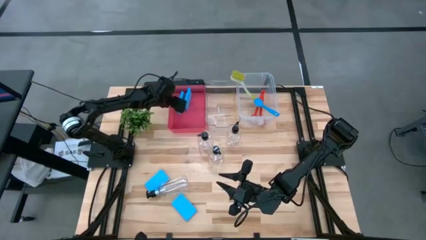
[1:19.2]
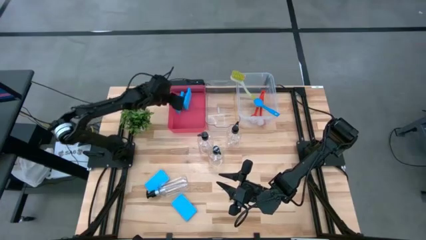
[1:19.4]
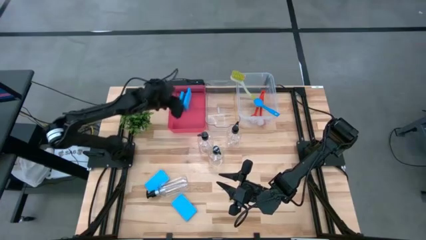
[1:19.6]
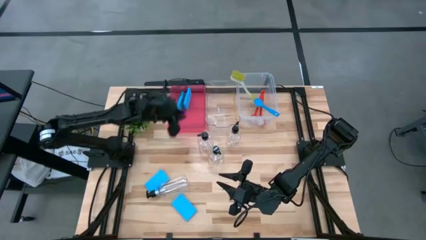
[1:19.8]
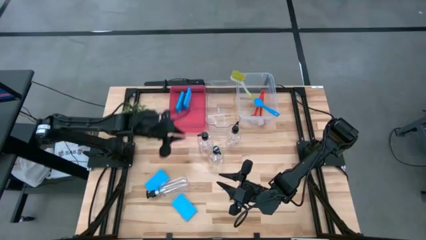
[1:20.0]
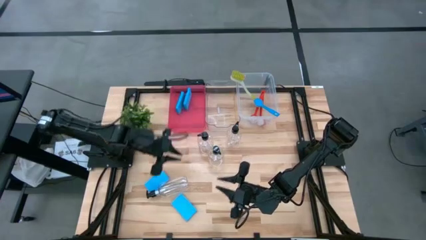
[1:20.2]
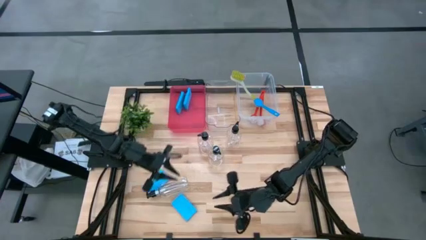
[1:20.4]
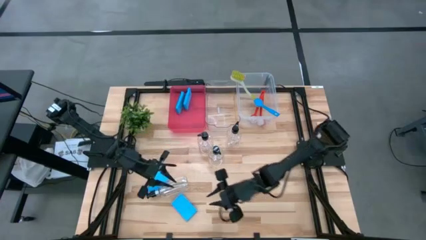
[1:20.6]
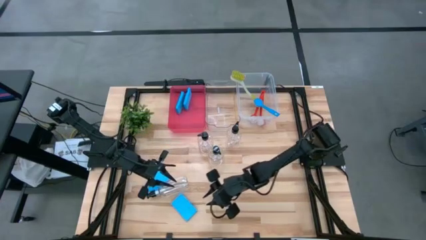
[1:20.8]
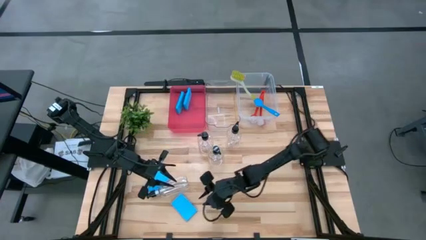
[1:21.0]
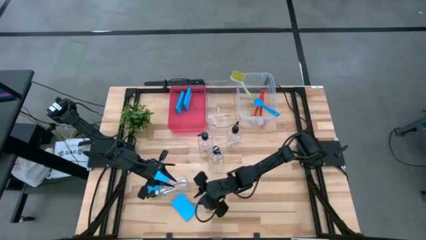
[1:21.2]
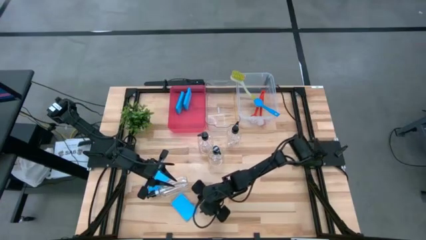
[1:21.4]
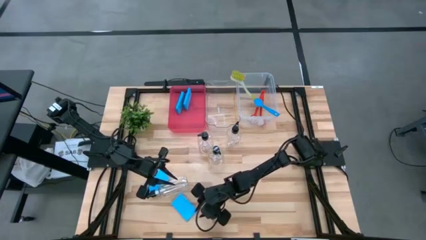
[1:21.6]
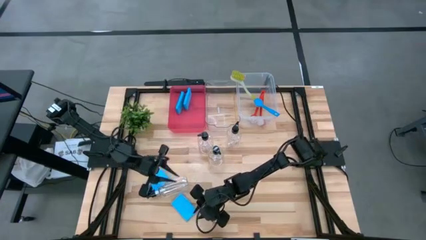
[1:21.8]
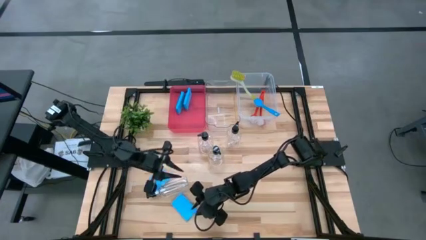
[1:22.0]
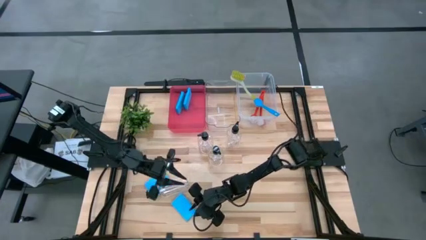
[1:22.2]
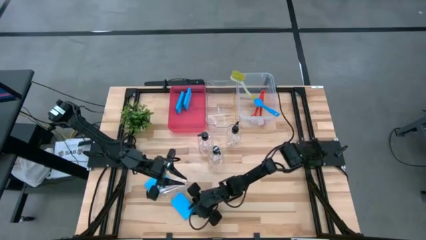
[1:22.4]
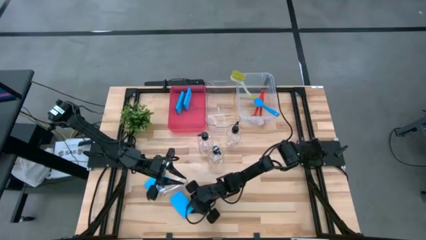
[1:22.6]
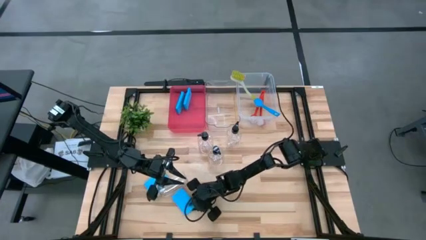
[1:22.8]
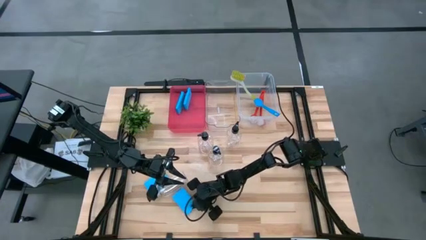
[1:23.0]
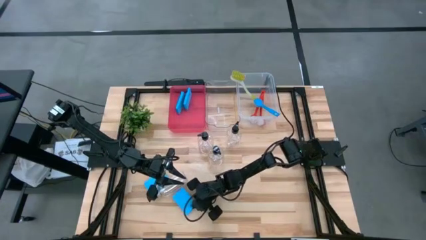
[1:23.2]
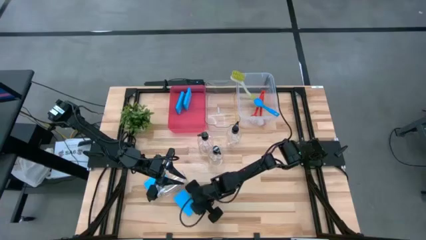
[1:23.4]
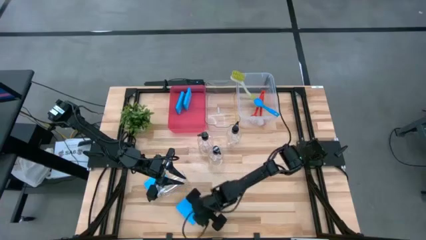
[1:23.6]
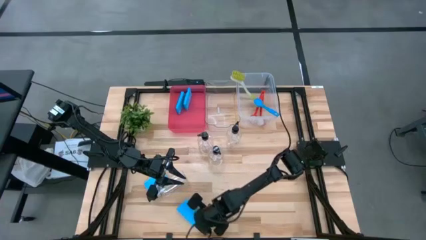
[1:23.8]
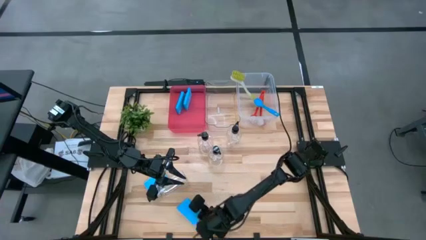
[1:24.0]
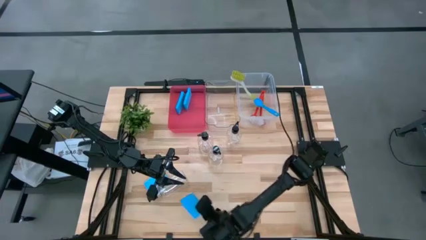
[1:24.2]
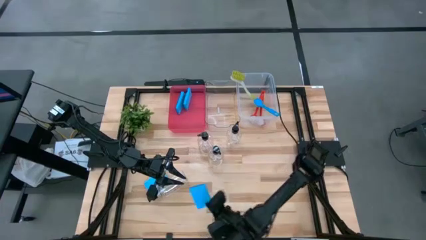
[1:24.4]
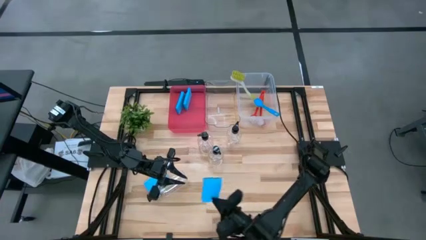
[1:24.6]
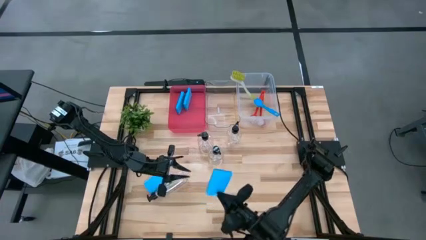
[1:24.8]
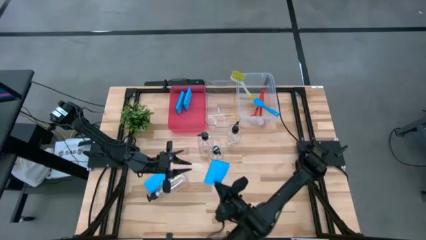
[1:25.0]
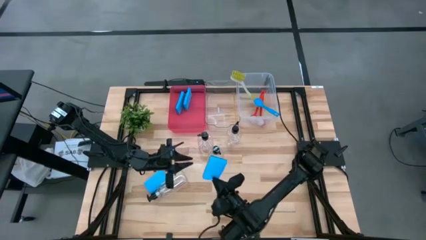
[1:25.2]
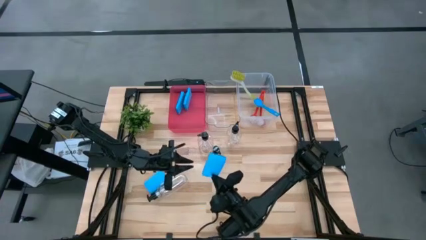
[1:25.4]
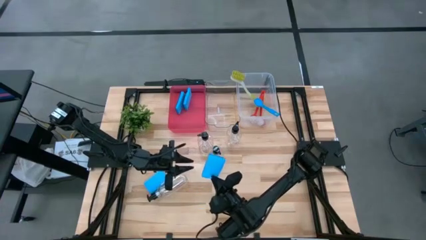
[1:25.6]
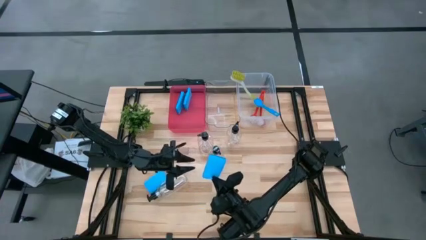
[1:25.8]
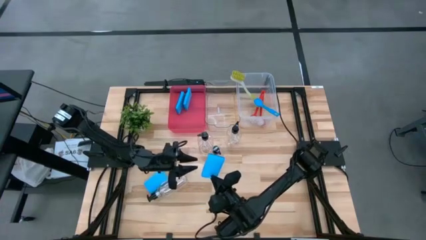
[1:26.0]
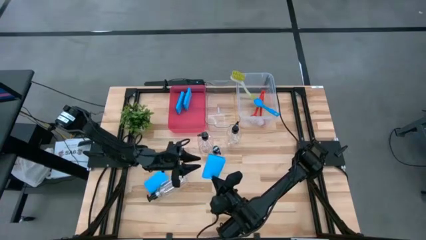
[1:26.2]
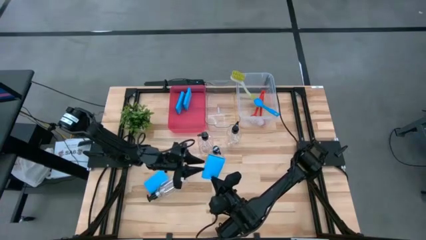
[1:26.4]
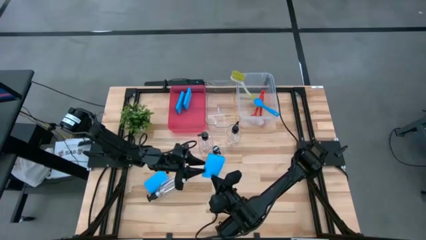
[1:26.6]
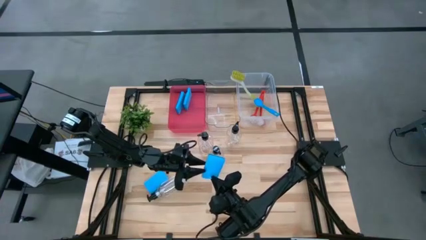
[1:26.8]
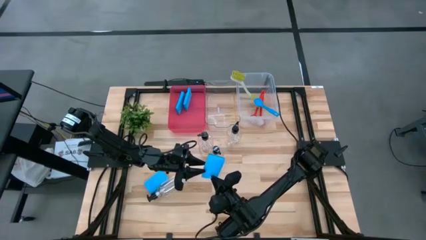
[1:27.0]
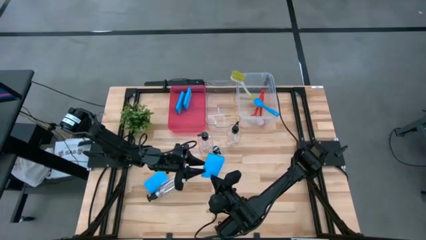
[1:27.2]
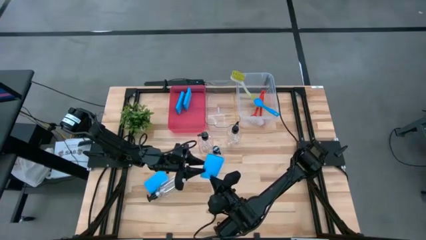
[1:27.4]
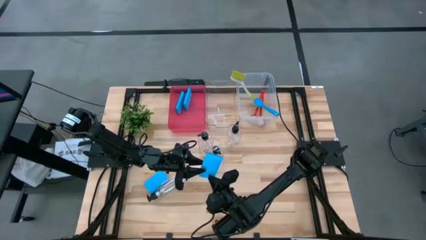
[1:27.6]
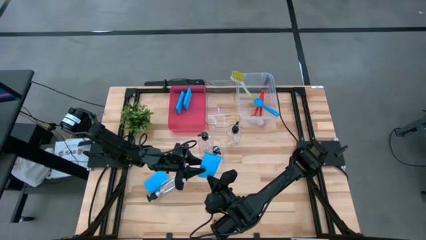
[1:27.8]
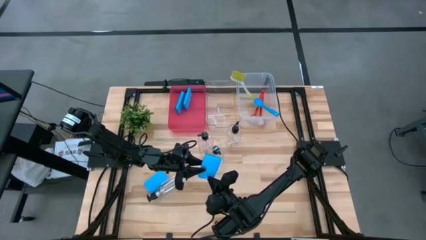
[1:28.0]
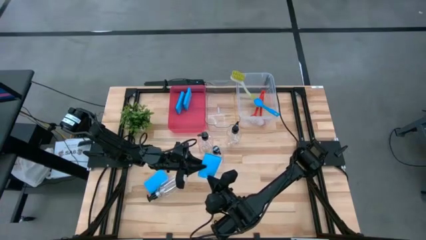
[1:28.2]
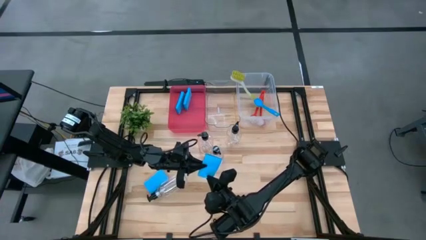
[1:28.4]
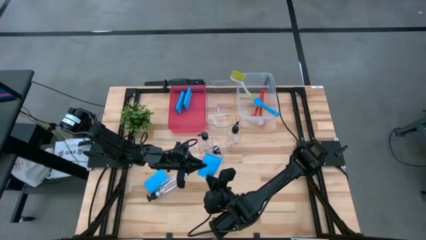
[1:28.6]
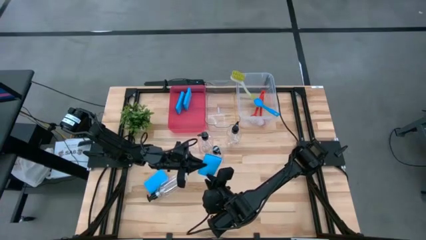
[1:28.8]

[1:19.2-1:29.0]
Task: Pick & Place Kitchen Sink Supplies
Put the blue sponge into the red bin

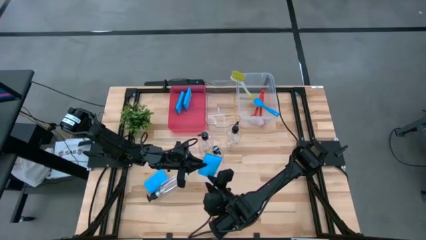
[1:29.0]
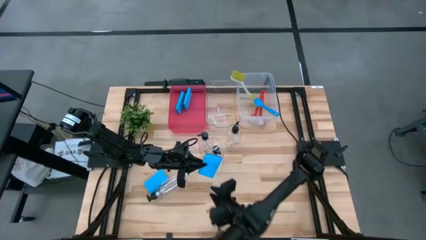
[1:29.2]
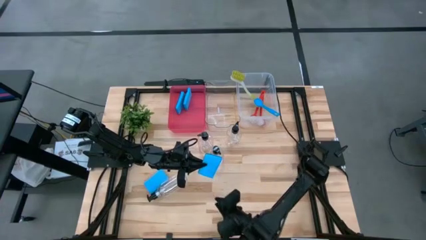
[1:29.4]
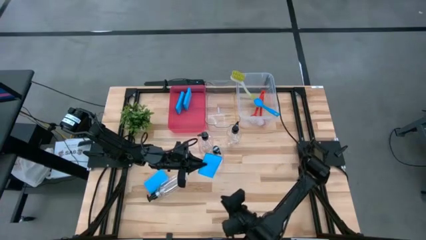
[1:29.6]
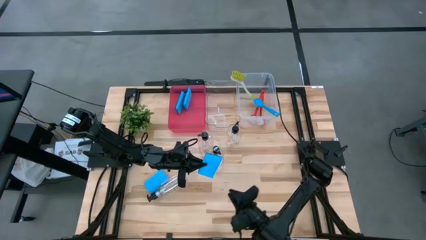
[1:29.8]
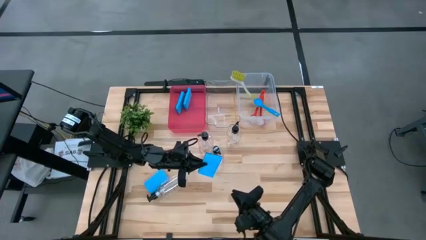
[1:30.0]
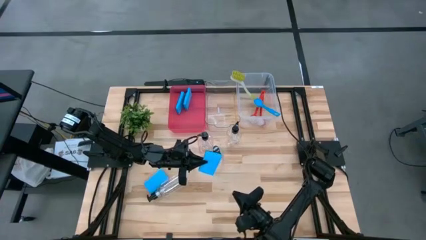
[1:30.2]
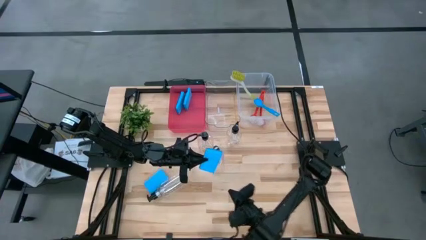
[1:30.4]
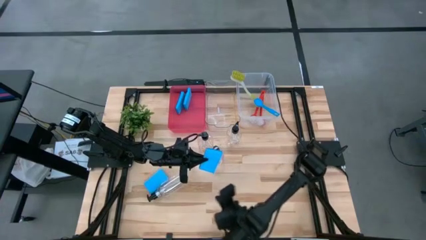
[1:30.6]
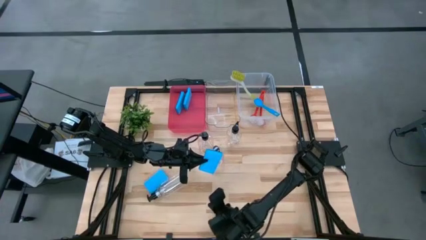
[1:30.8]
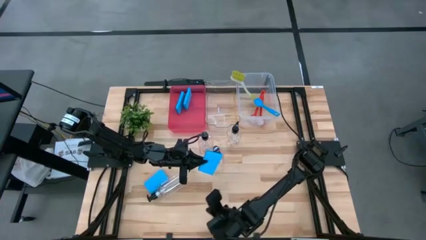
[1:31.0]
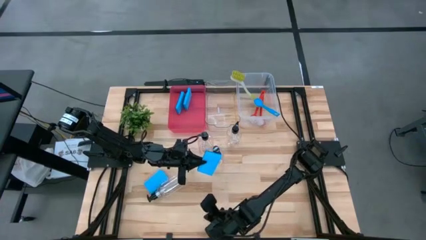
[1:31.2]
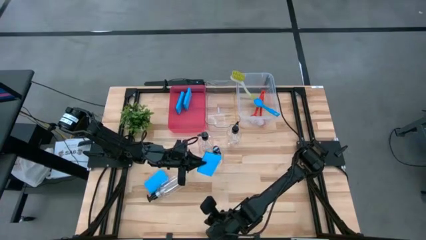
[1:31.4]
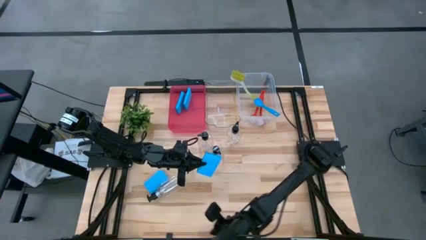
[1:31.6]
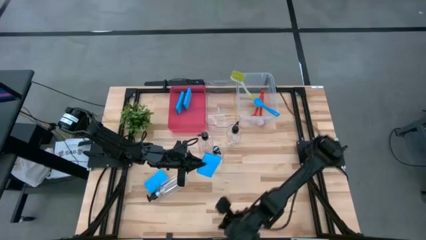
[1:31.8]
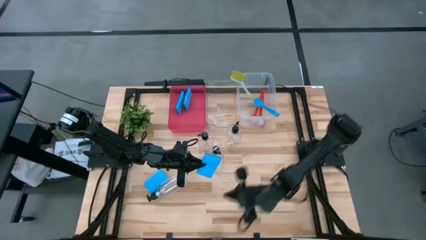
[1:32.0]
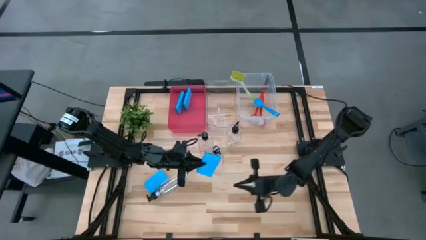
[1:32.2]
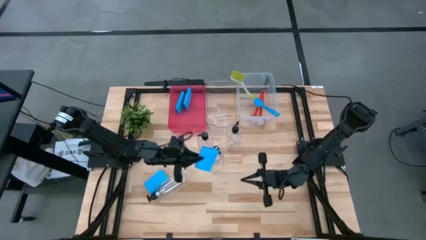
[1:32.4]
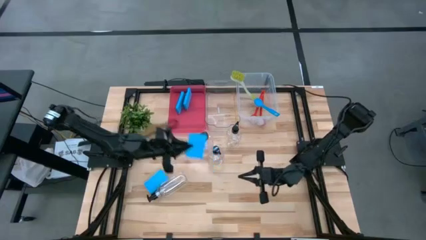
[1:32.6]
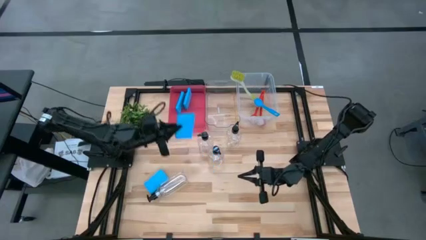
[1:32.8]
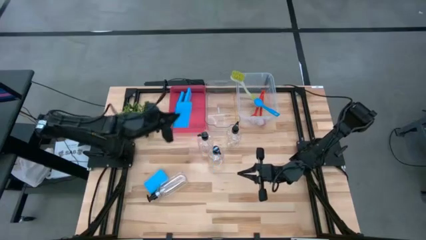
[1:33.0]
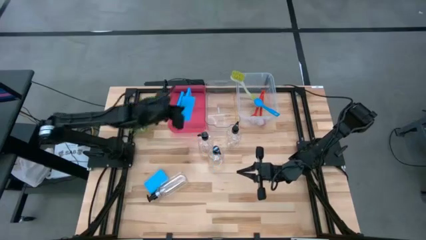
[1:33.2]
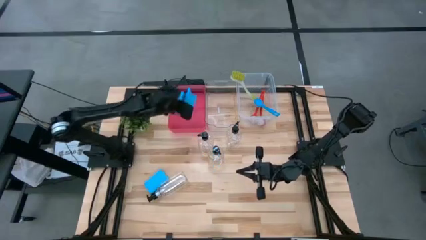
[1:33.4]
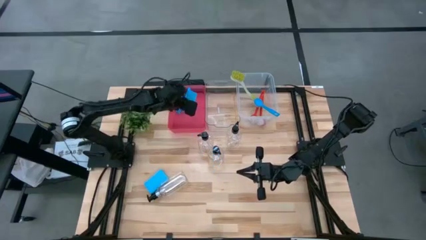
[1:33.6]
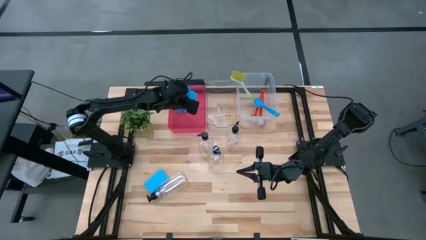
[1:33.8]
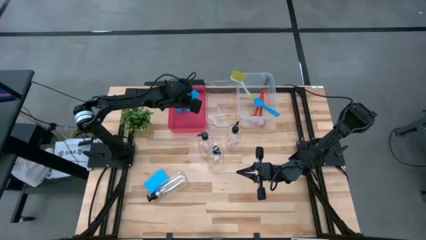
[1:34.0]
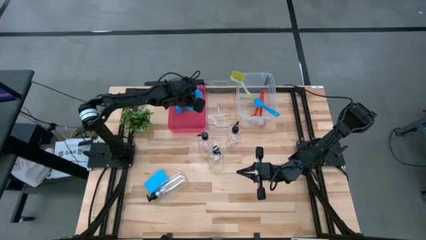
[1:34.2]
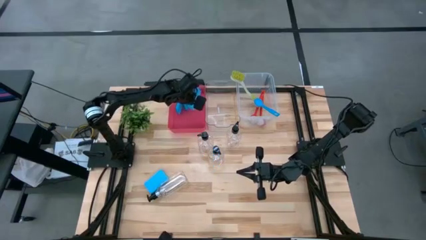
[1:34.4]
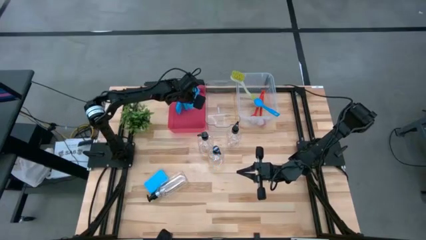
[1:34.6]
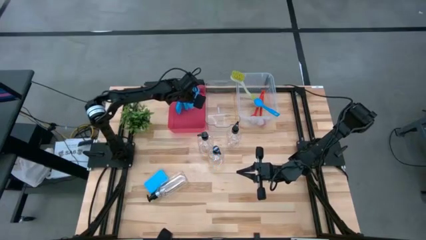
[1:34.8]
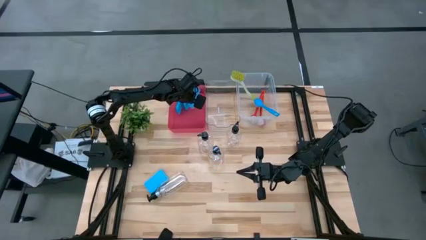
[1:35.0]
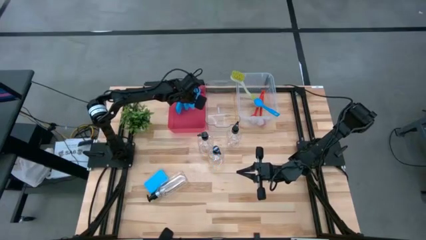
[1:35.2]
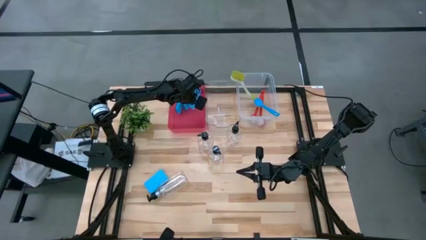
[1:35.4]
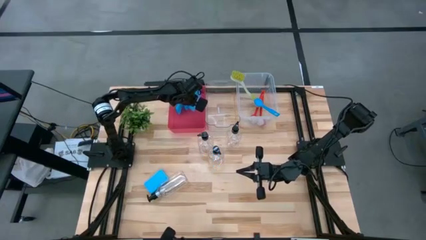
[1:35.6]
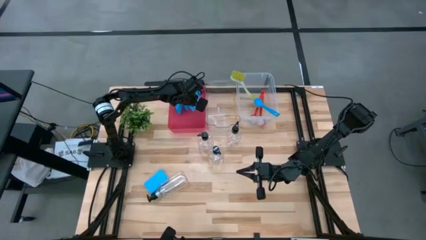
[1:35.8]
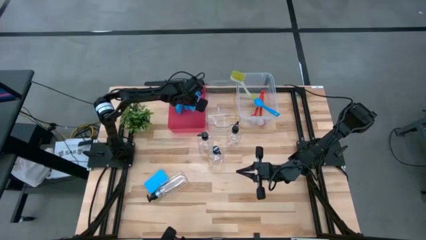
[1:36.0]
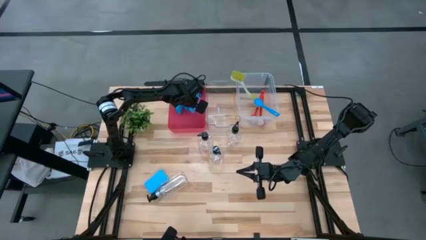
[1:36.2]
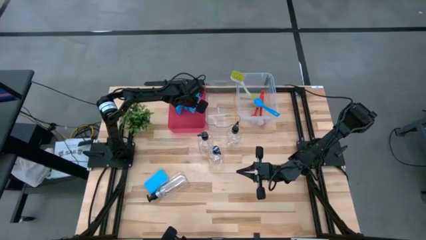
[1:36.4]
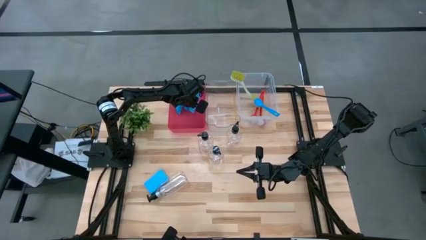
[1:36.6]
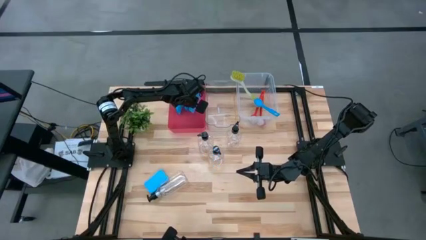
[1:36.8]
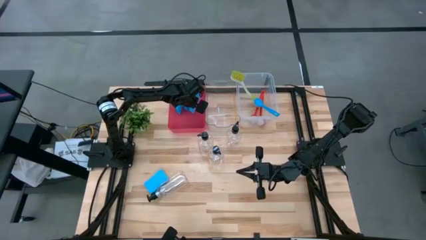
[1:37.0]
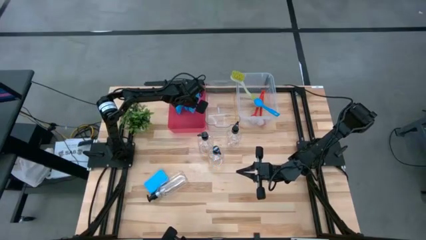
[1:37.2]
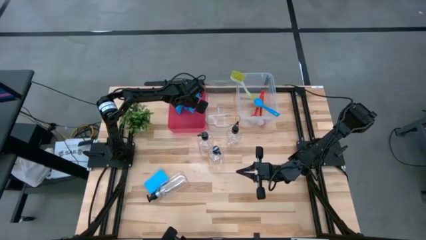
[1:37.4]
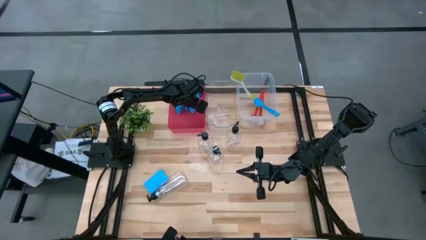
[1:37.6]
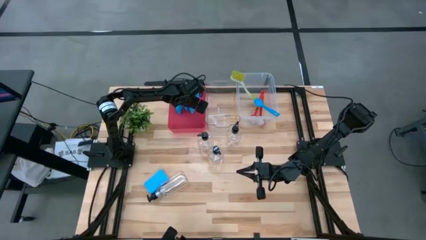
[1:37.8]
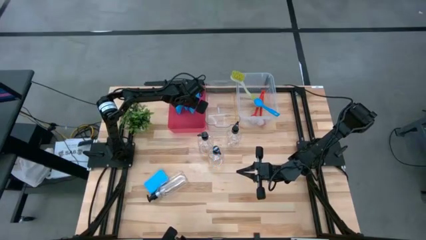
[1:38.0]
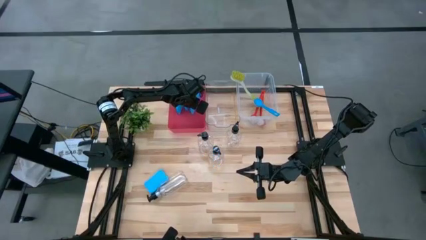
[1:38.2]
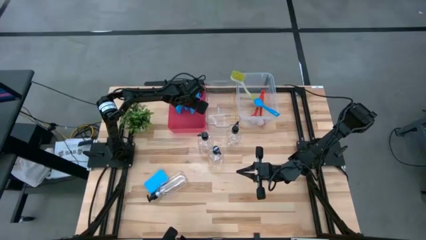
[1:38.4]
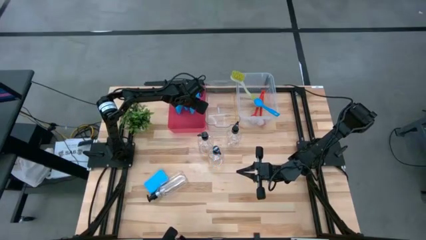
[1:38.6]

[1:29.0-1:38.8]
Put the blue sponge into the red bin
